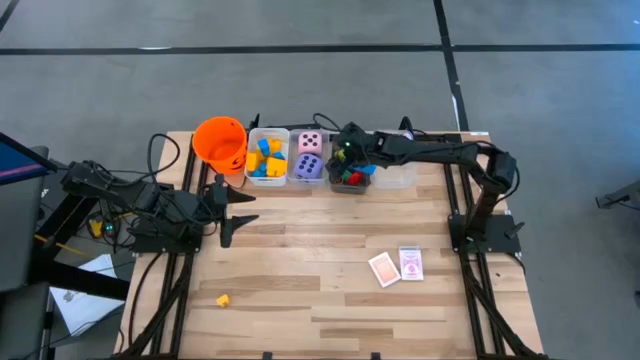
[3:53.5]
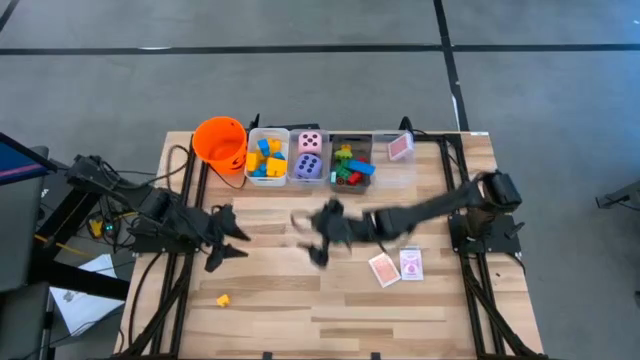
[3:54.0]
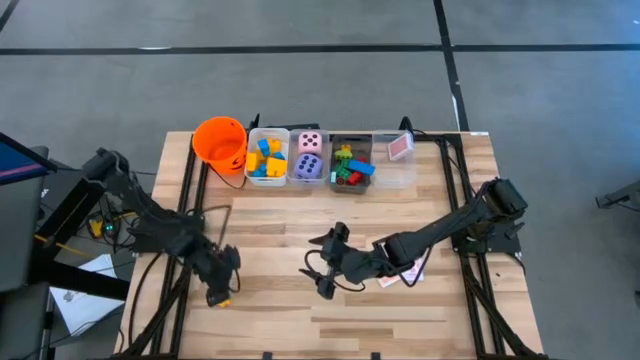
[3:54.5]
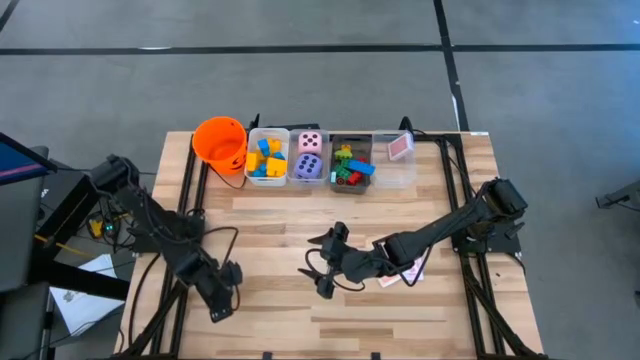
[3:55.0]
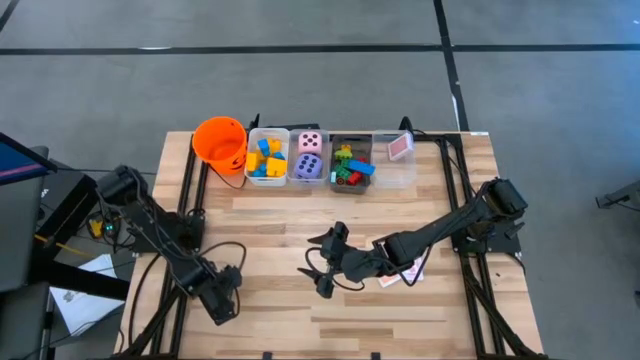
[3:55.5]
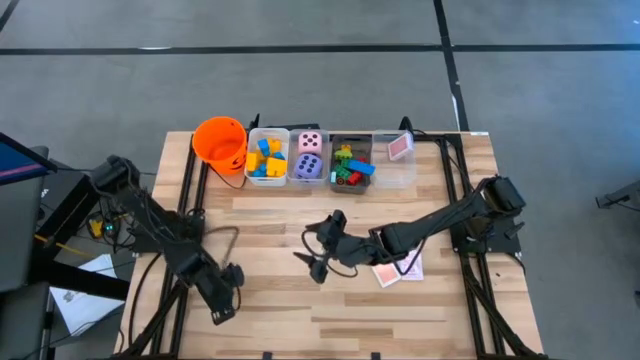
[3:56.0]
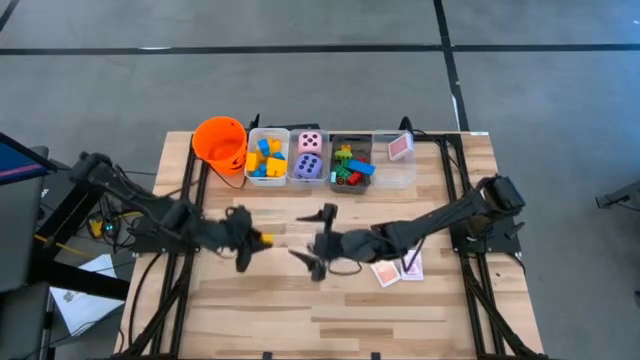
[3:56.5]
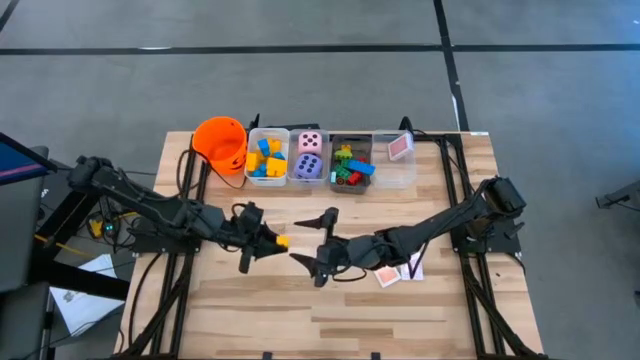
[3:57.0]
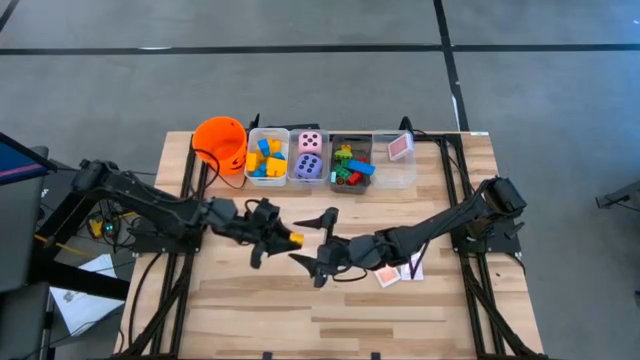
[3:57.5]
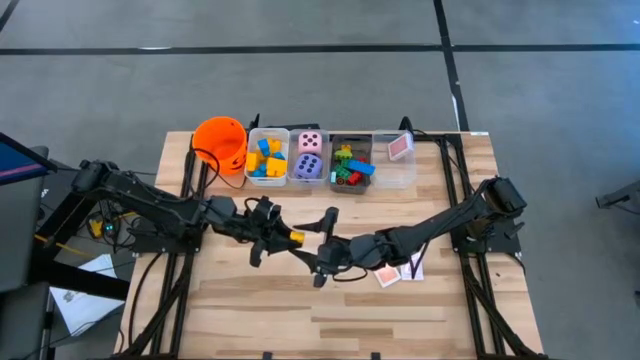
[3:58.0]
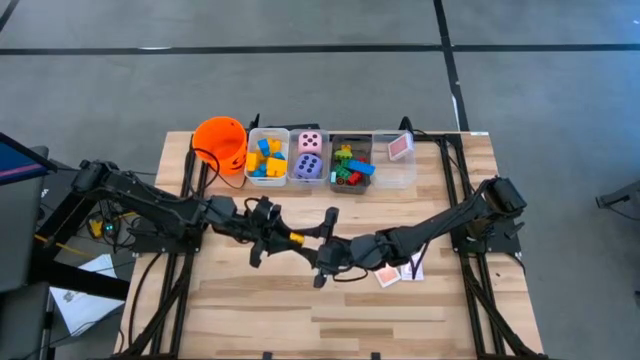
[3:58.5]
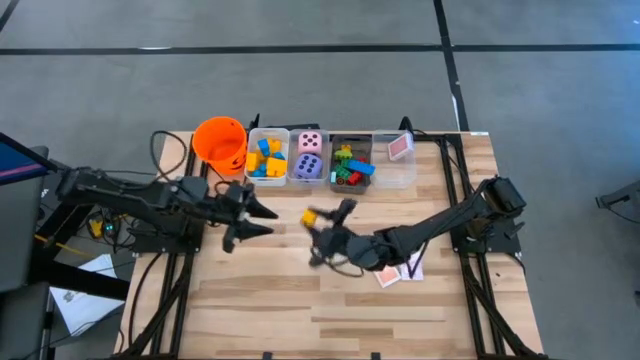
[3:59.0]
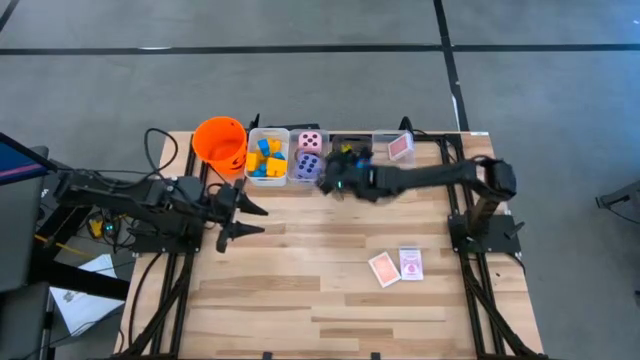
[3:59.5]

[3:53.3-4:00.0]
Task: Pick & Place Toys
Put the yellow game piece into the black bin

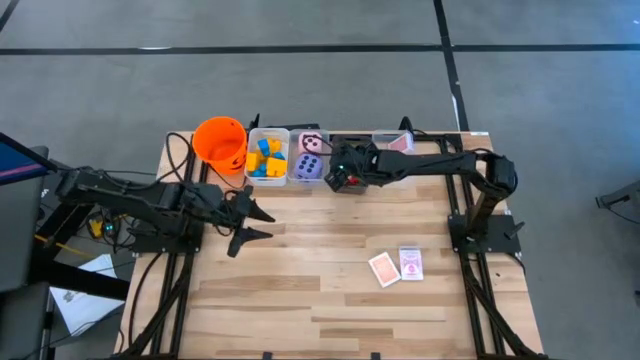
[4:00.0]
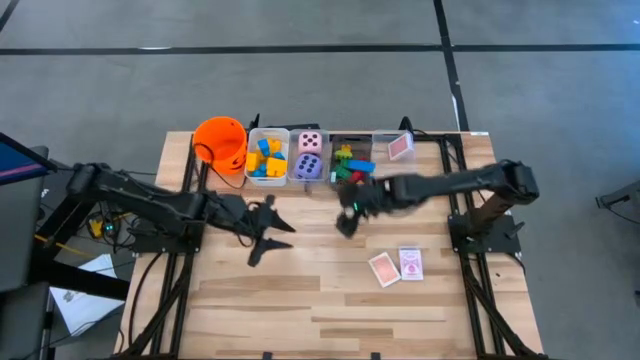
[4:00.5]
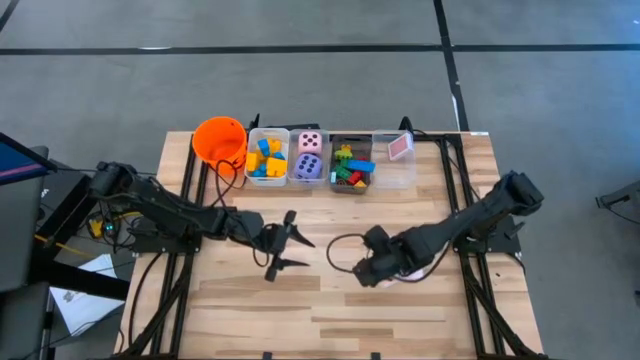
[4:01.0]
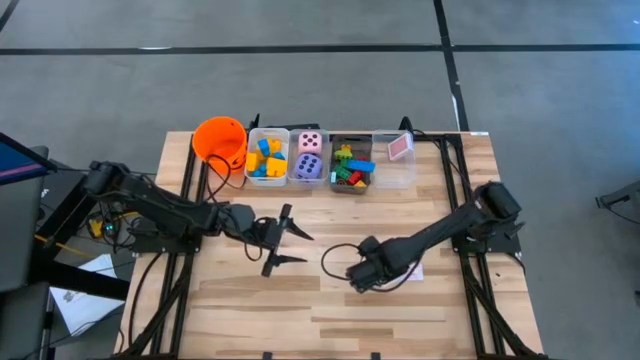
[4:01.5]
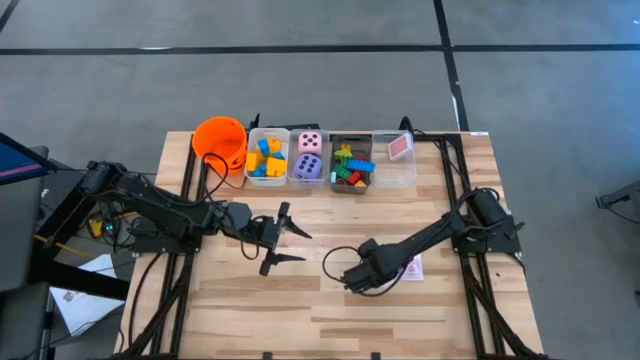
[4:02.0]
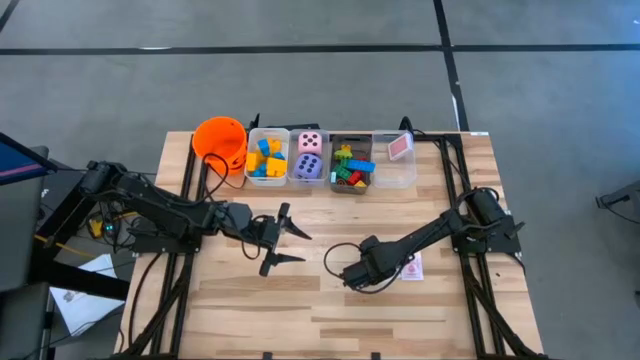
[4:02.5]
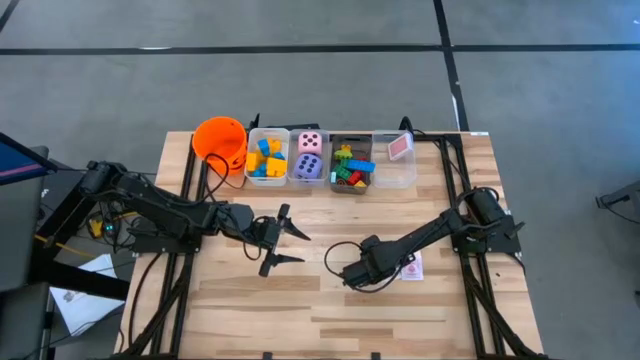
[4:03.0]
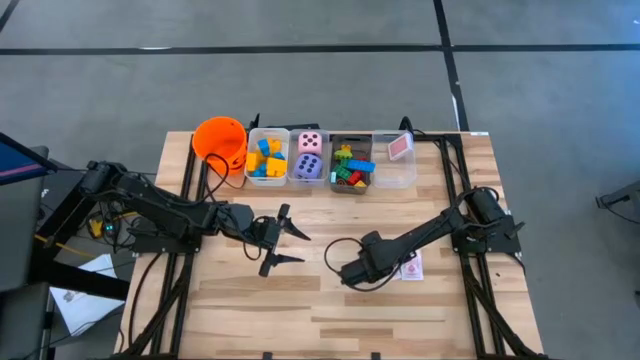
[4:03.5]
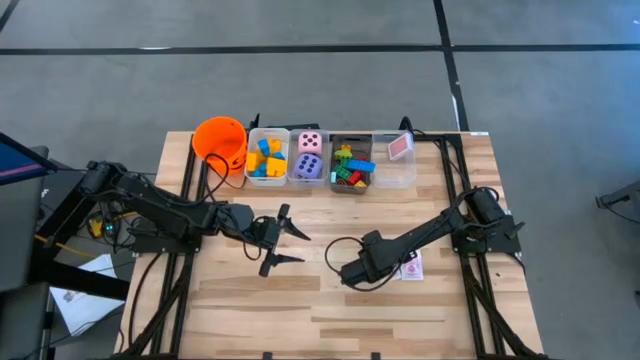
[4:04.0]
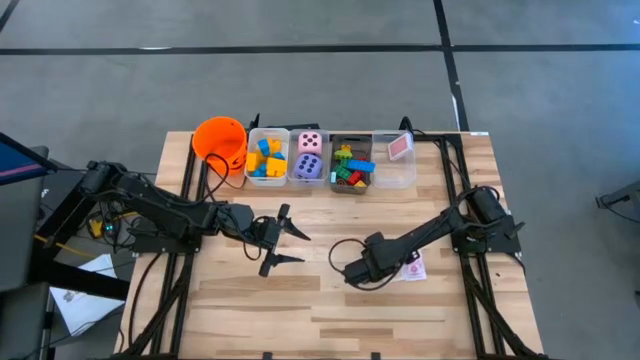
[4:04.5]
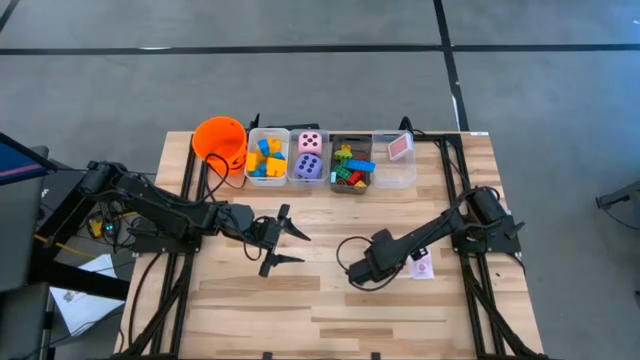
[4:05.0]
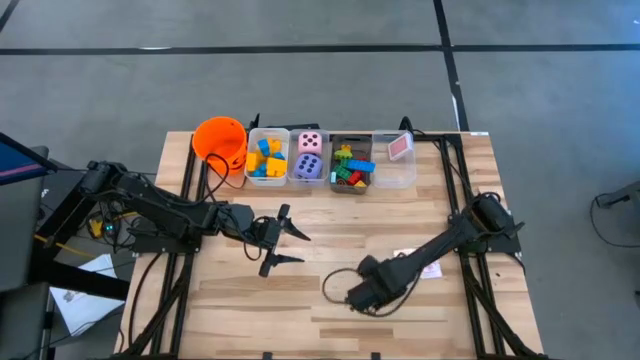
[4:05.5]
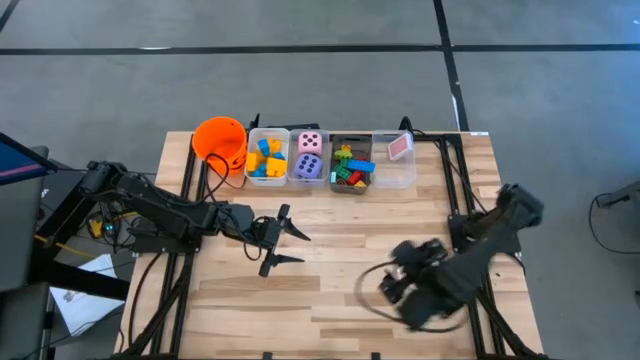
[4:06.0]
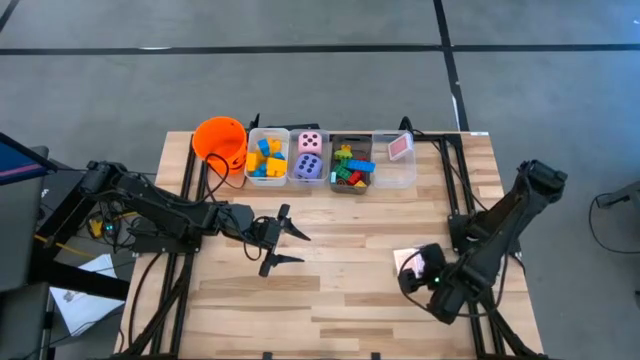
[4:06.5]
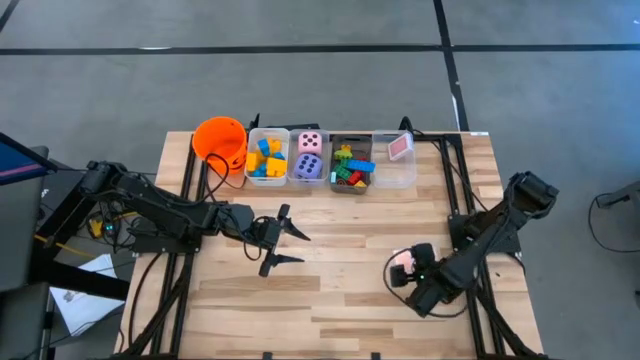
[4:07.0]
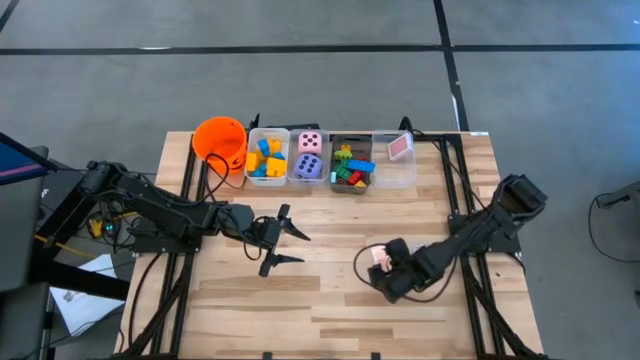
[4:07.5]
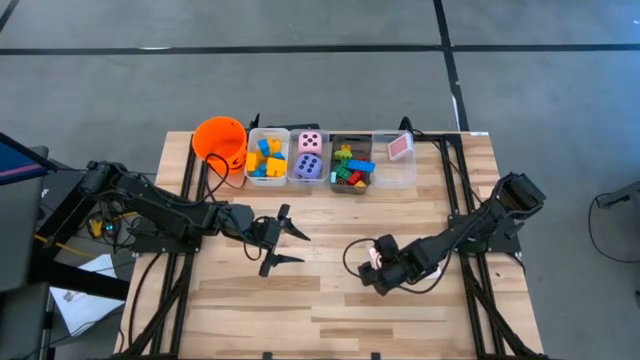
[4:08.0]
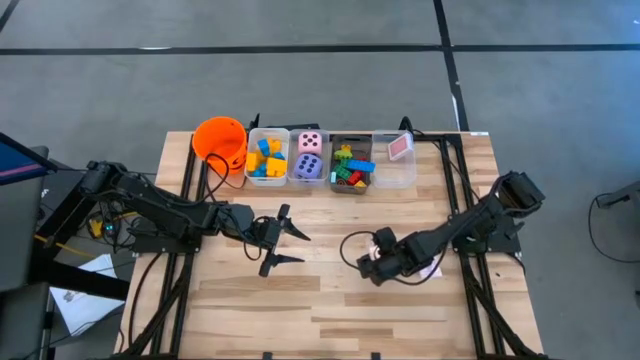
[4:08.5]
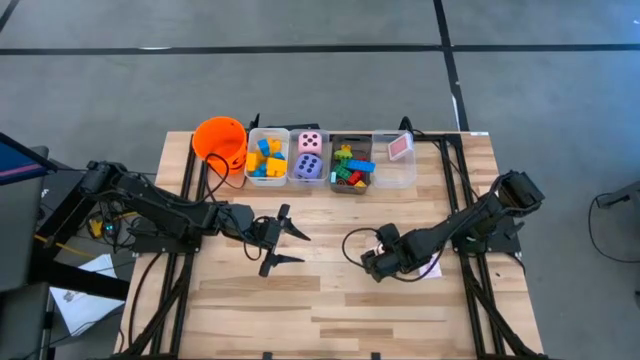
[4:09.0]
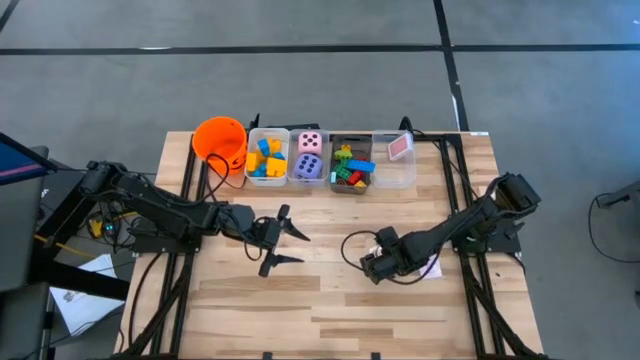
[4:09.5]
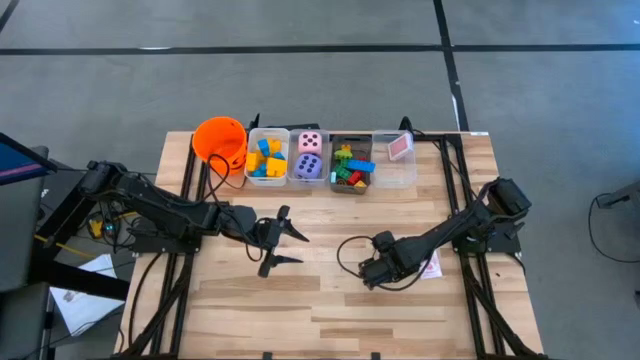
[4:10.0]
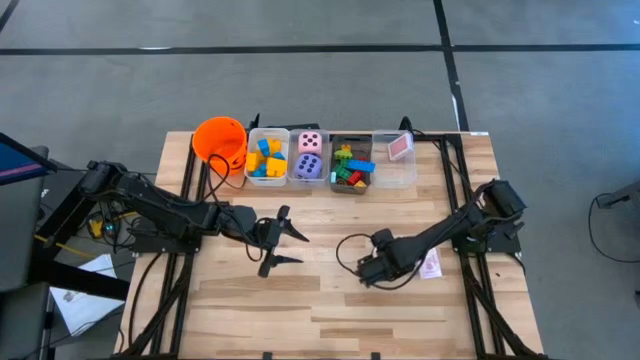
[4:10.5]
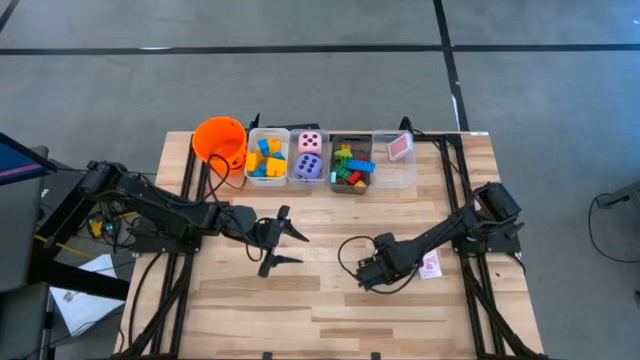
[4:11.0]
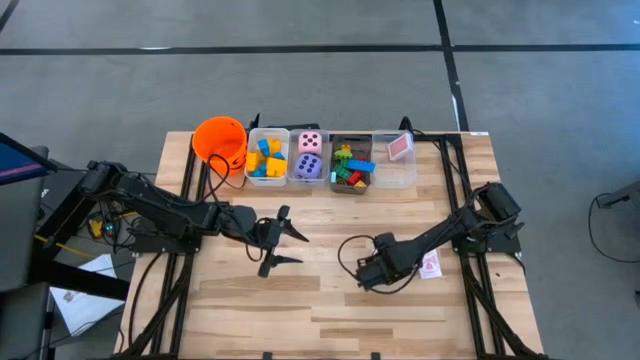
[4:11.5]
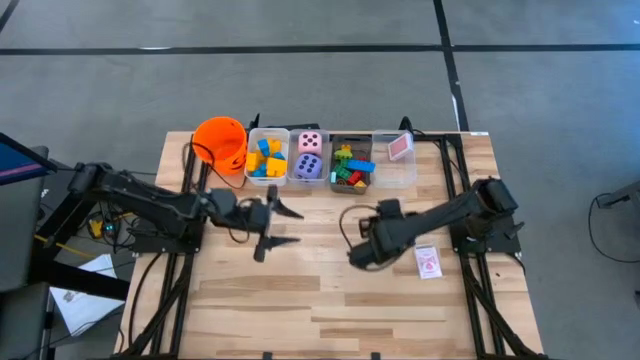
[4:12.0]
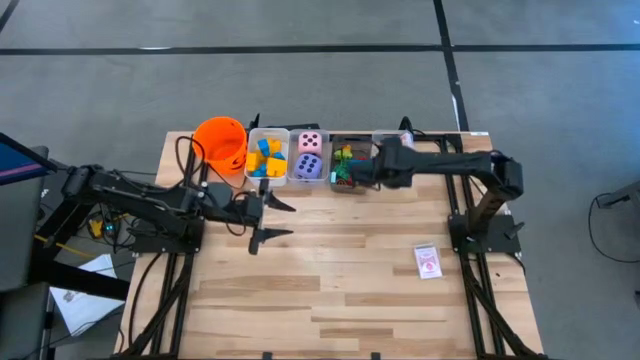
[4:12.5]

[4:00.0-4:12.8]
Put the orange deck of cards into the right transparent bin

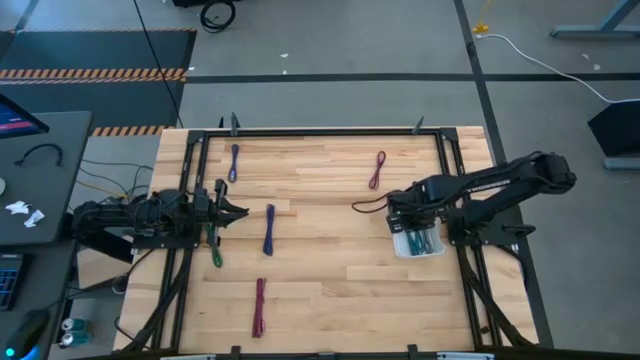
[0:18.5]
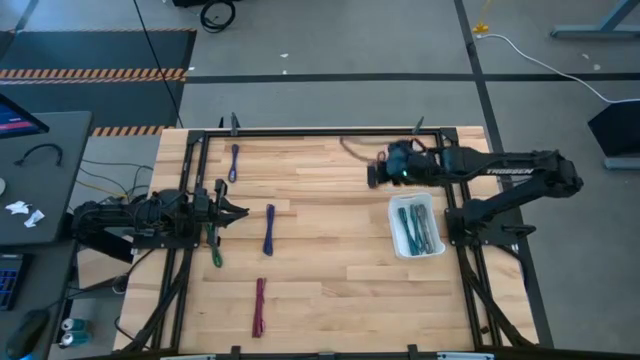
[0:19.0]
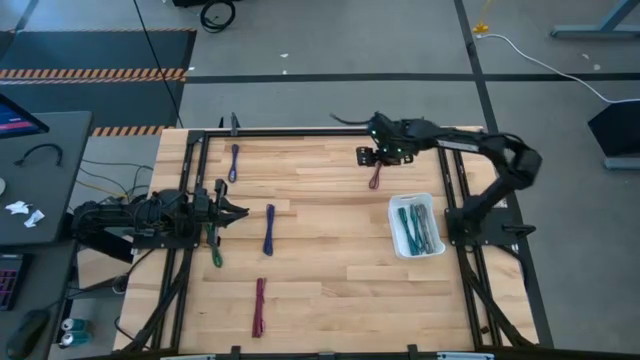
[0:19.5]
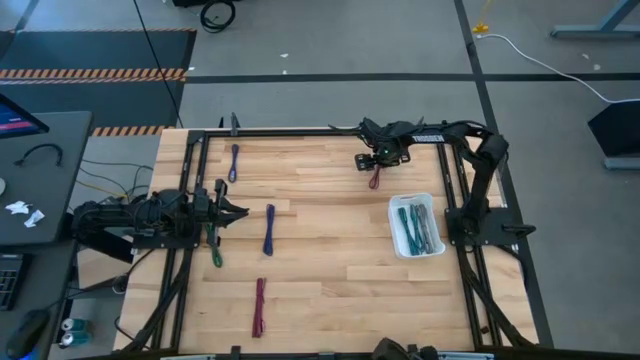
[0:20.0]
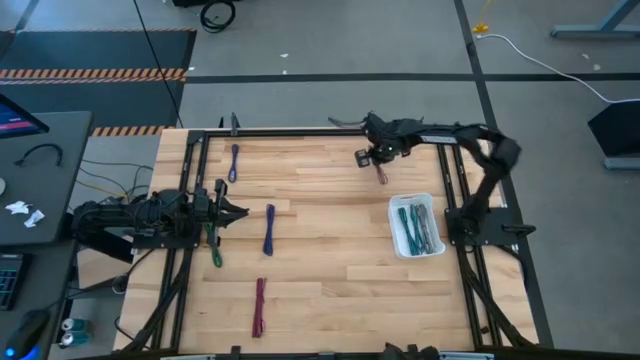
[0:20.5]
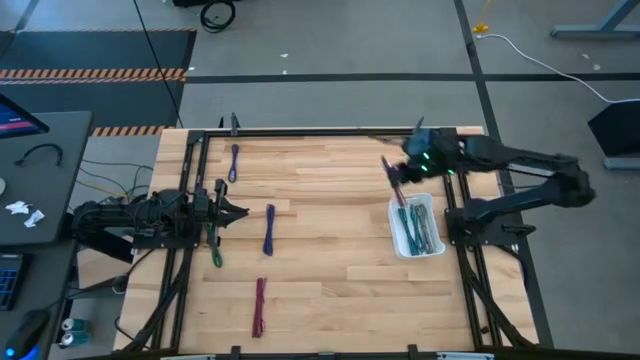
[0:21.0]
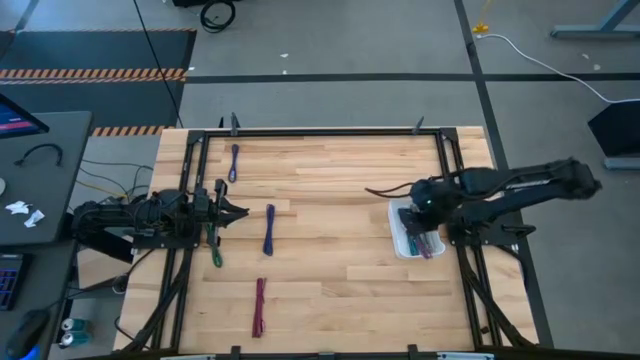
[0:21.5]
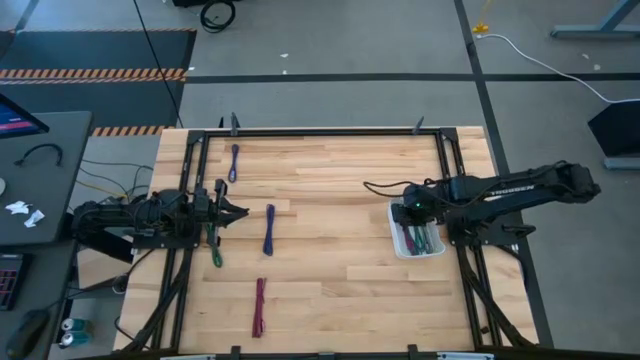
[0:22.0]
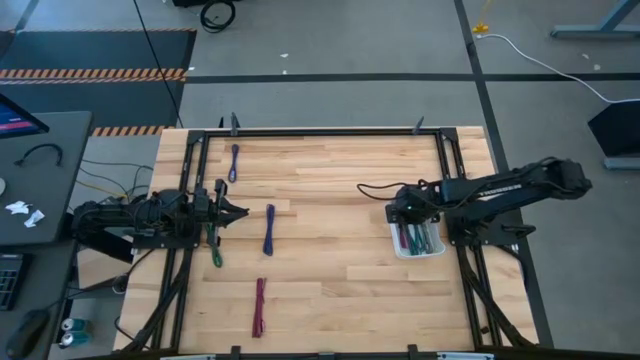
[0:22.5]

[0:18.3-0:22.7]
Task: Pick and place USB-C Cables
Put the top red charging cable into the white bin
